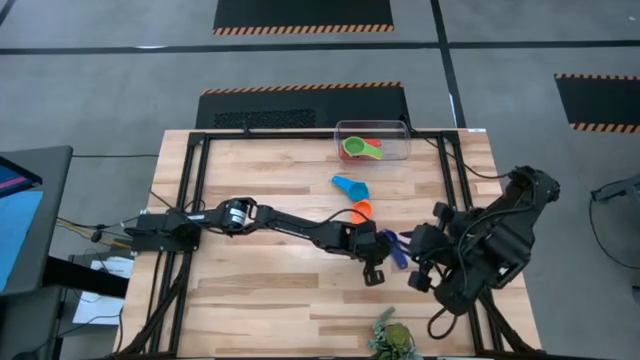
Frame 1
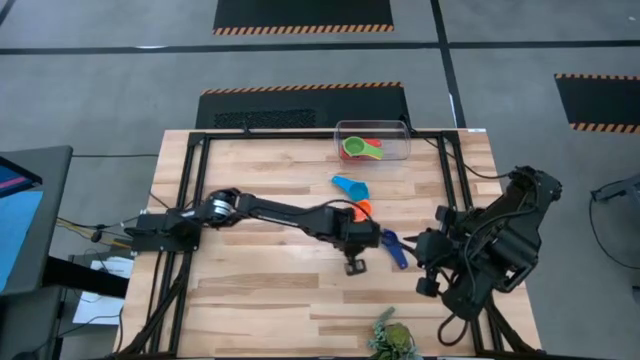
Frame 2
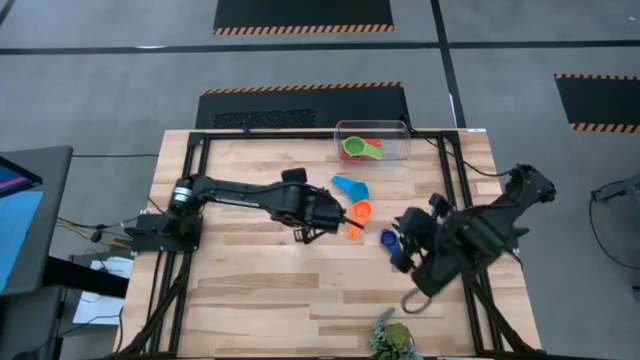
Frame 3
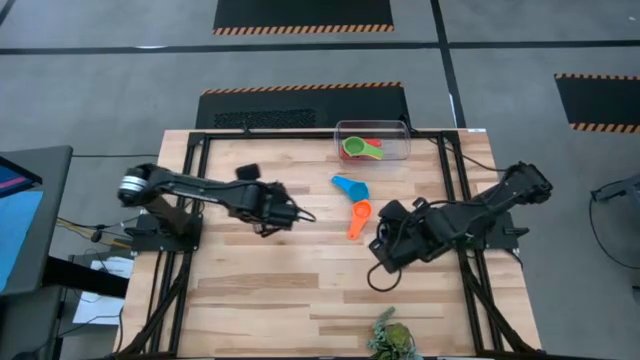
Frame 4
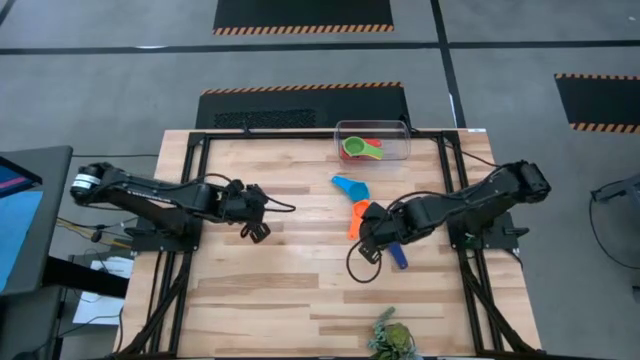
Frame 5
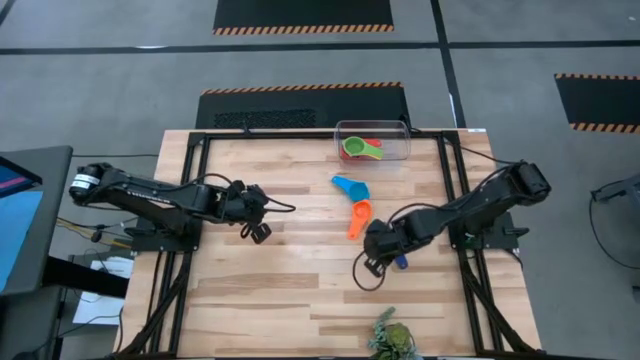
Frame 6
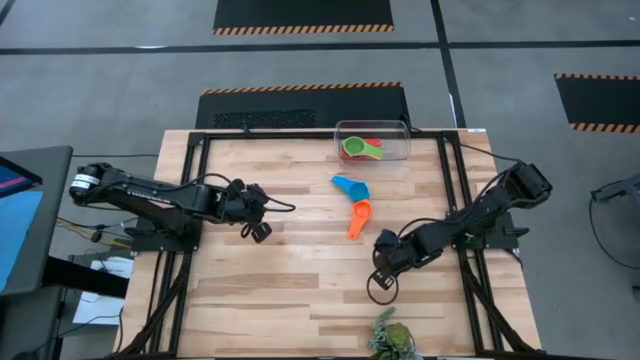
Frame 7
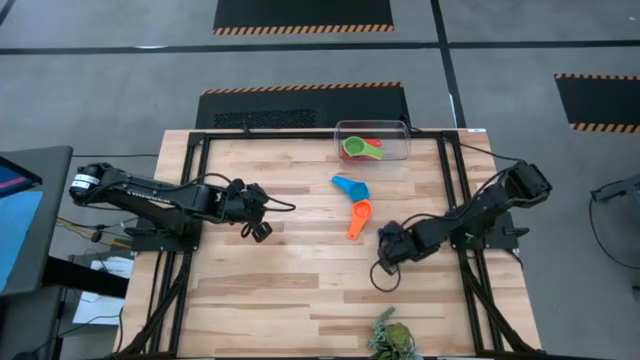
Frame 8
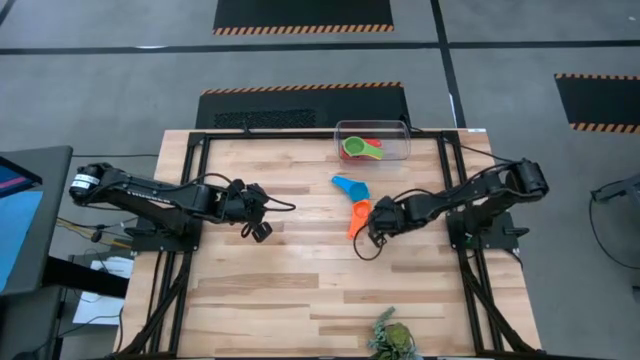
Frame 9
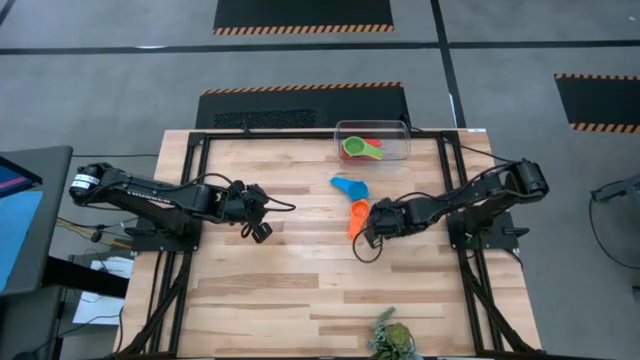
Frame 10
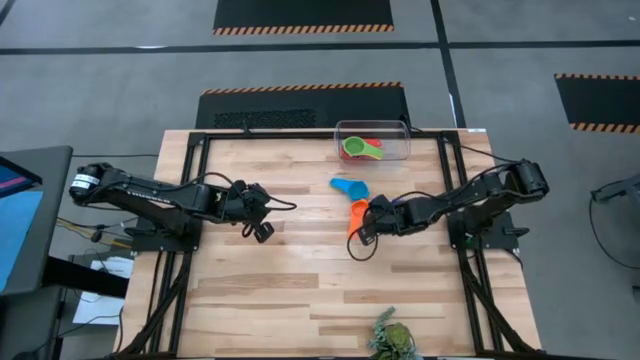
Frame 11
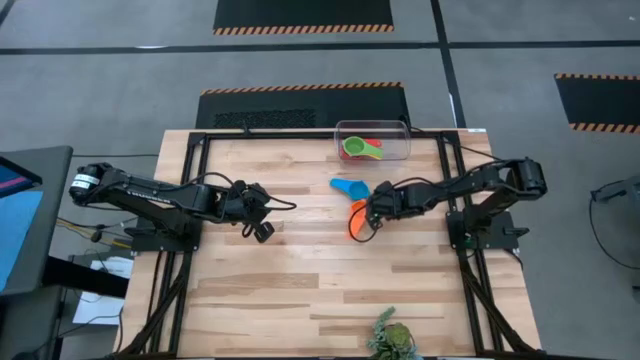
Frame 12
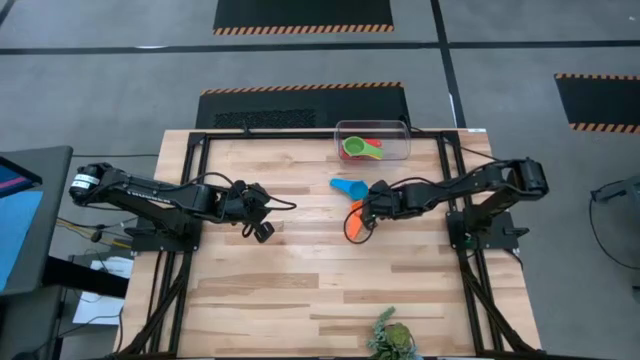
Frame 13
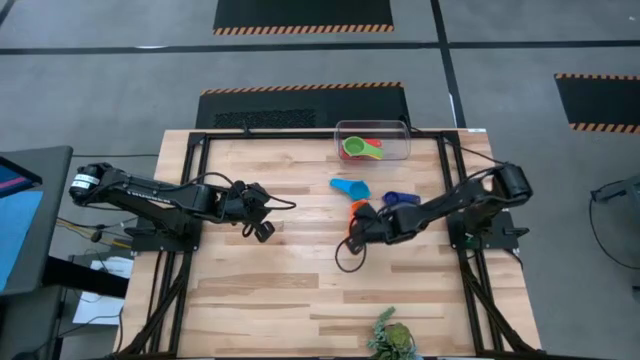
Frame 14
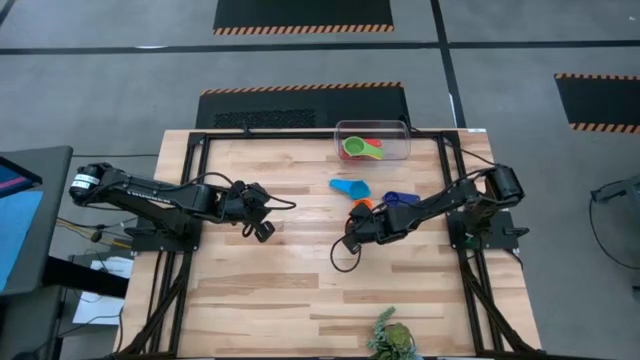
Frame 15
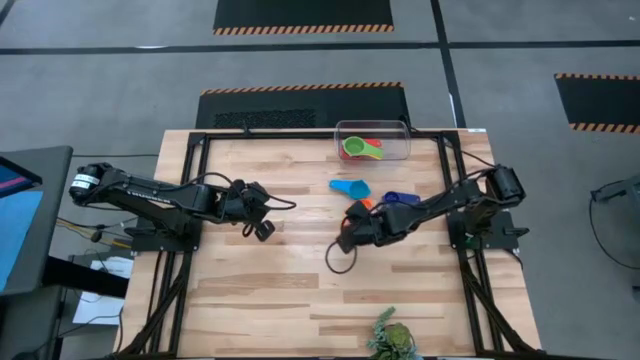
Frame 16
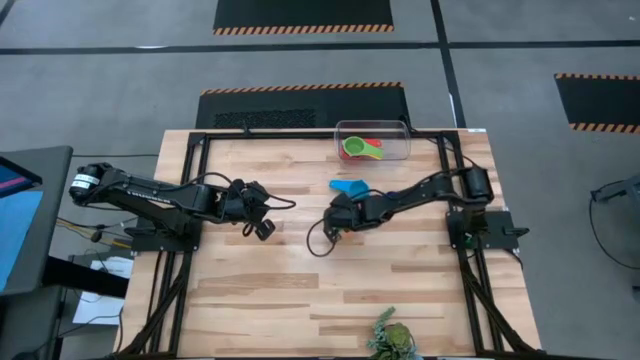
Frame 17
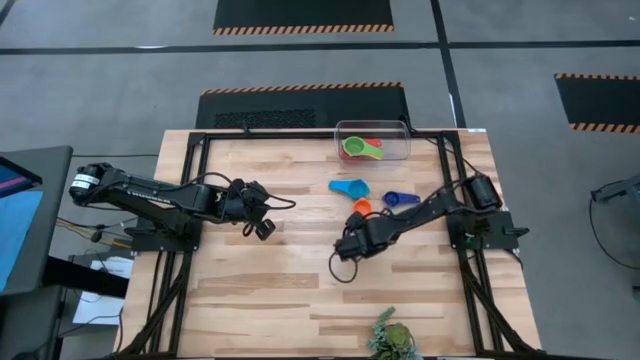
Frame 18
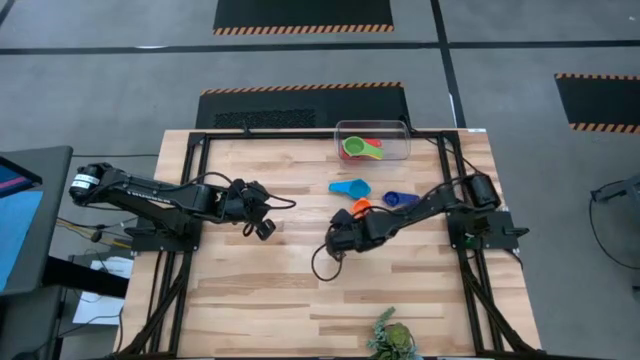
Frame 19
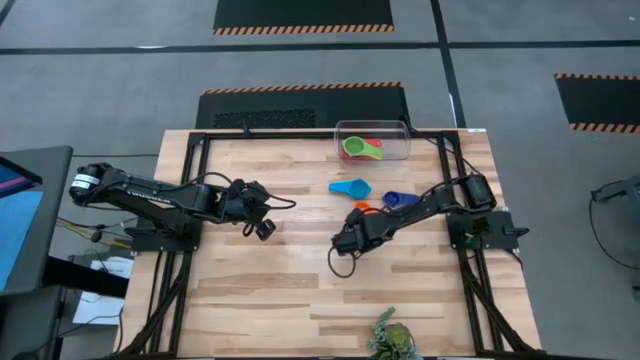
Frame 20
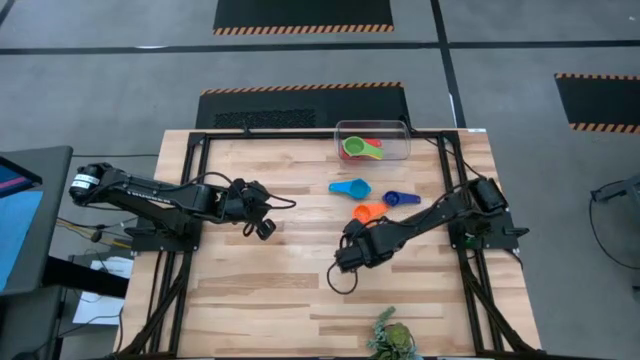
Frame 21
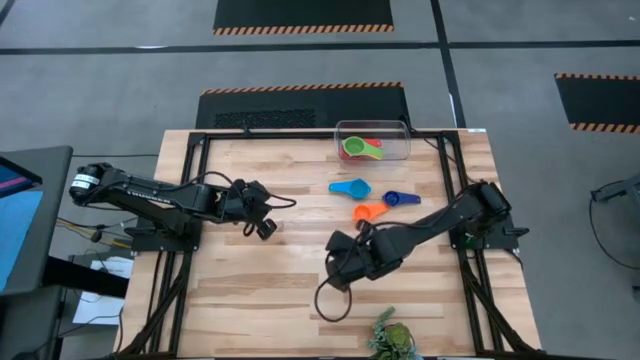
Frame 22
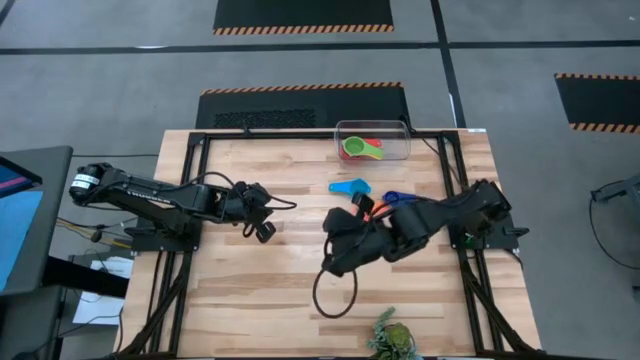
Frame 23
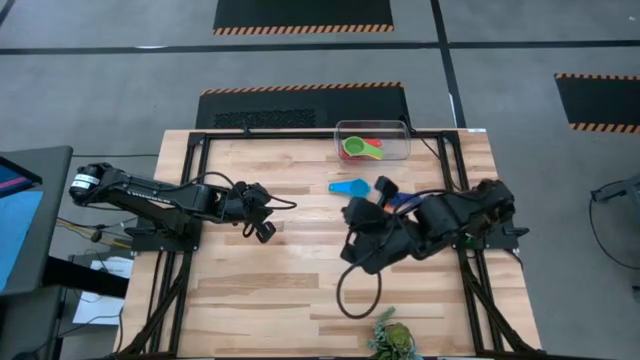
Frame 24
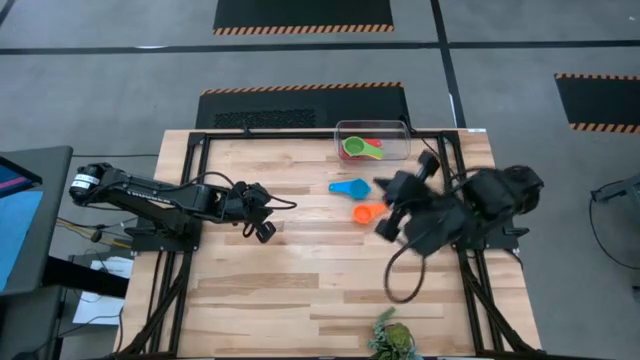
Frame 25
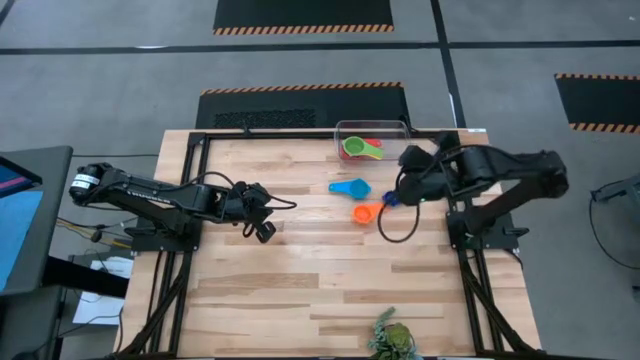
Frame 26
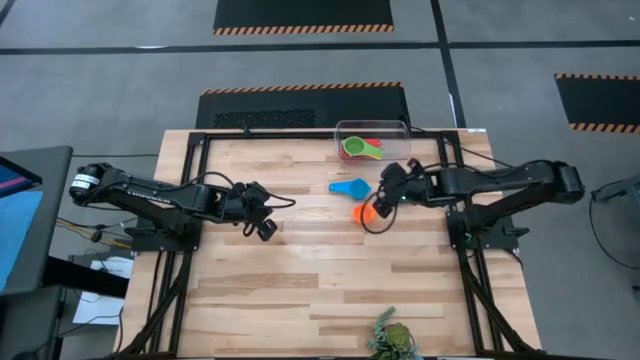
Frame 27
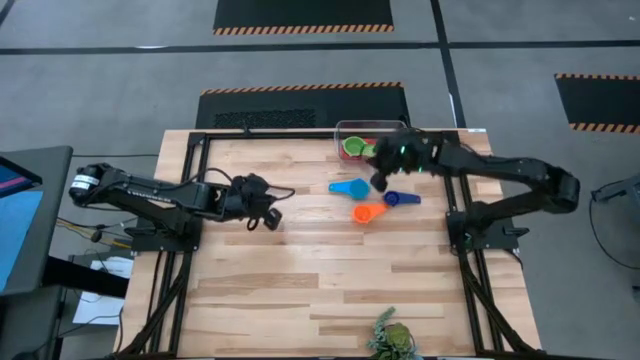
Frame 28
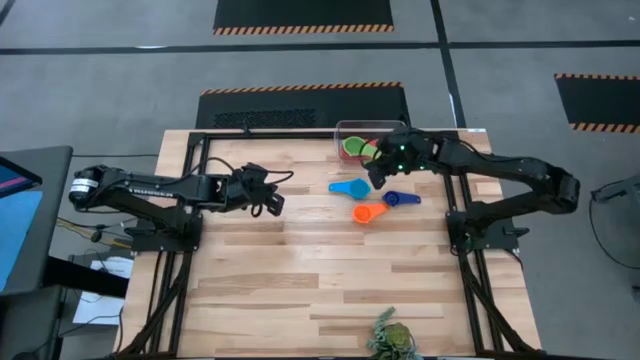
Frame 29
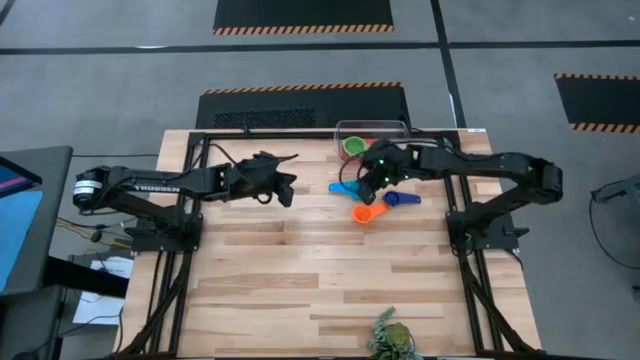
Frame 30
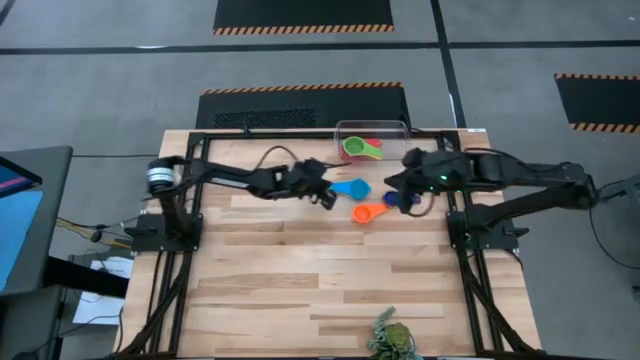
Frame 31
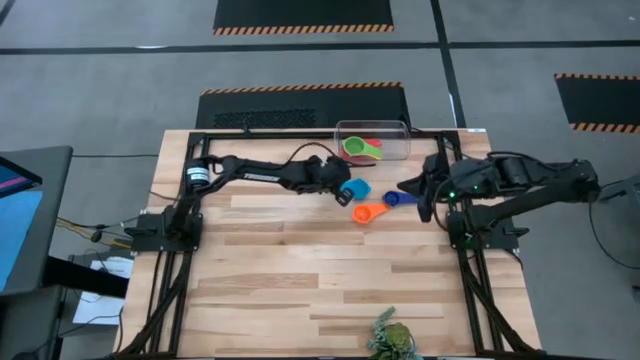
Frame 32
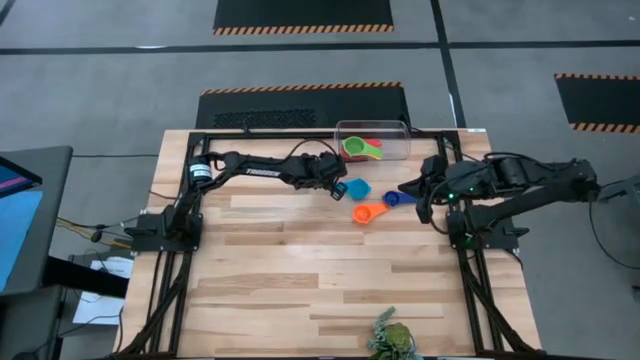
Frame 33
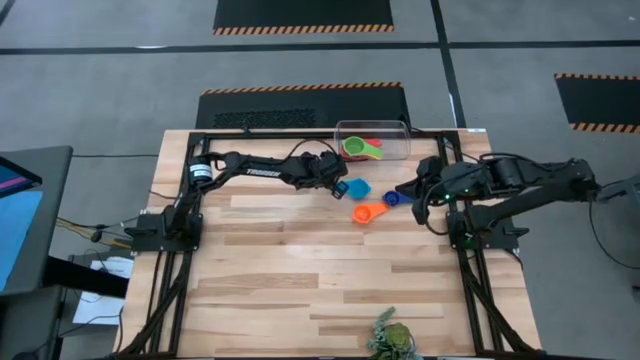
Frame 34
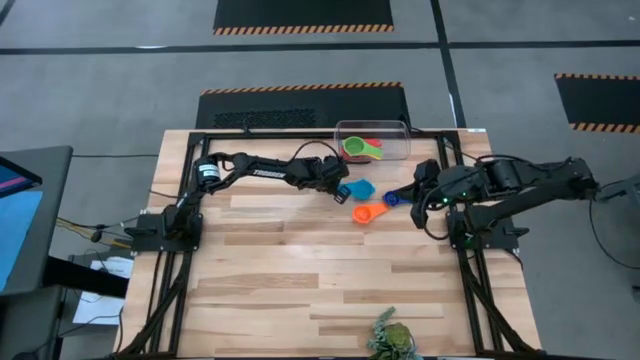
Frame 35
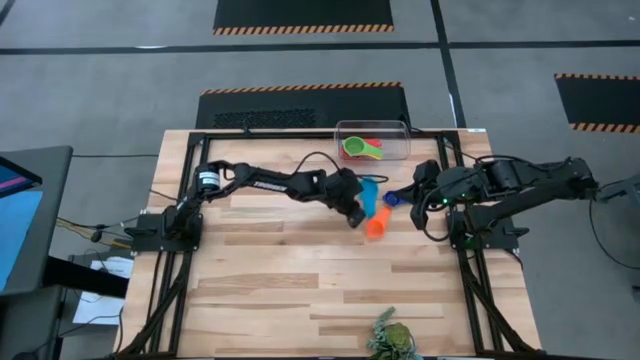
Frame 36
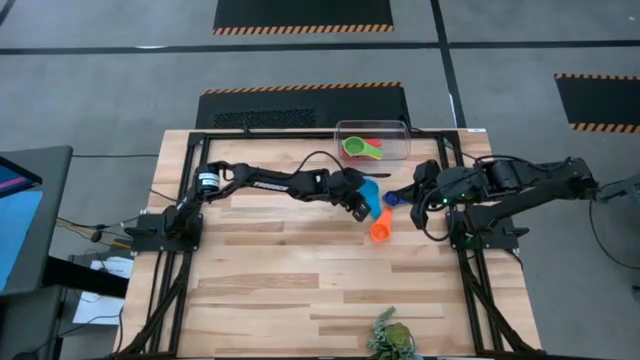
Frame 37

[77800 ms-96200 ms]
Task: Nest measuring cups in basket
Adjust the colored measuring cups to the top center of the table

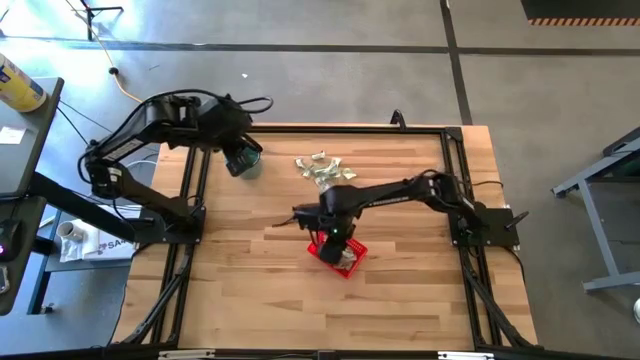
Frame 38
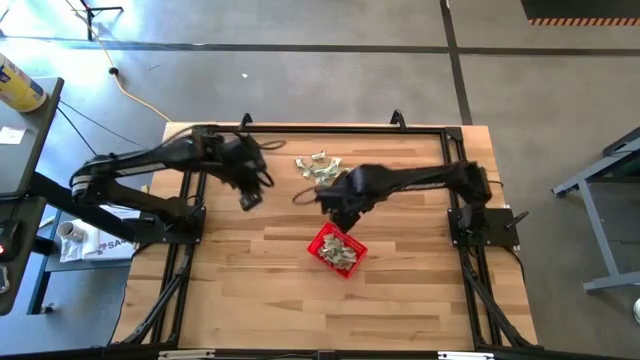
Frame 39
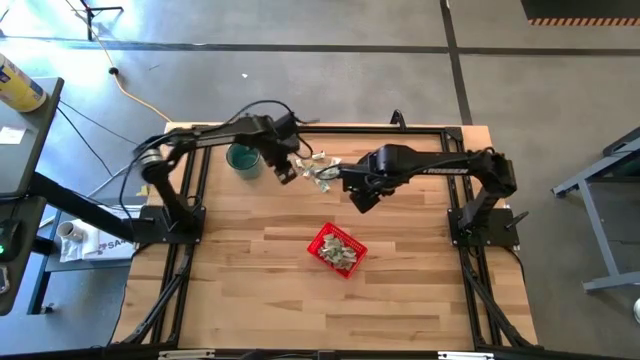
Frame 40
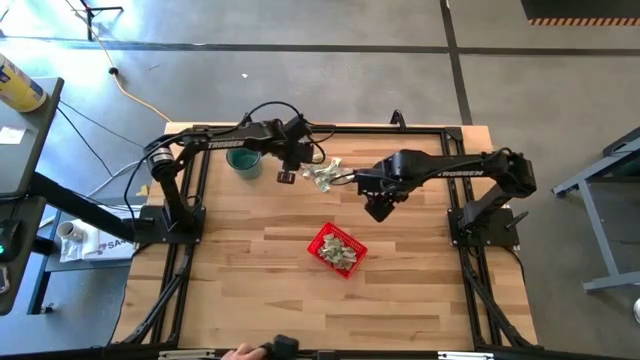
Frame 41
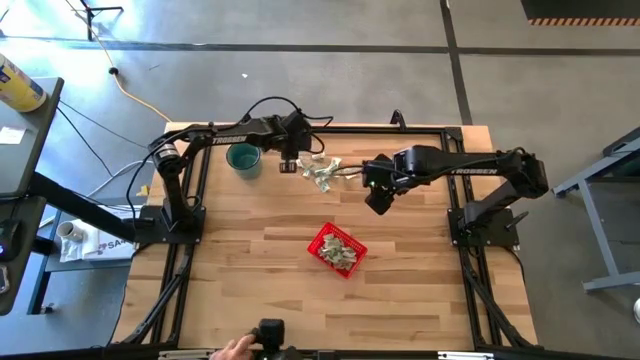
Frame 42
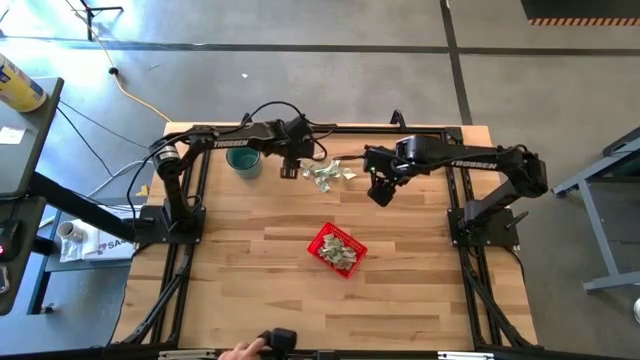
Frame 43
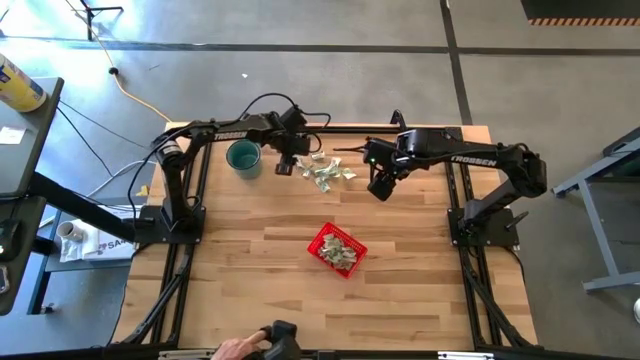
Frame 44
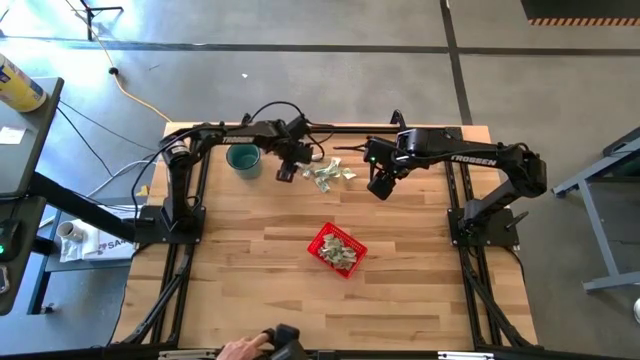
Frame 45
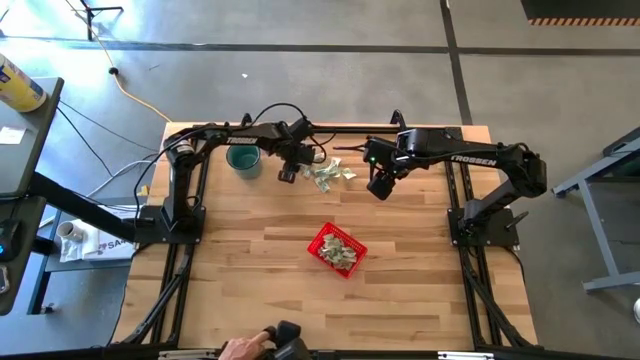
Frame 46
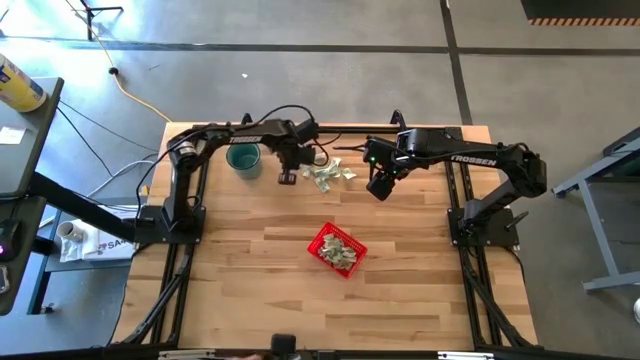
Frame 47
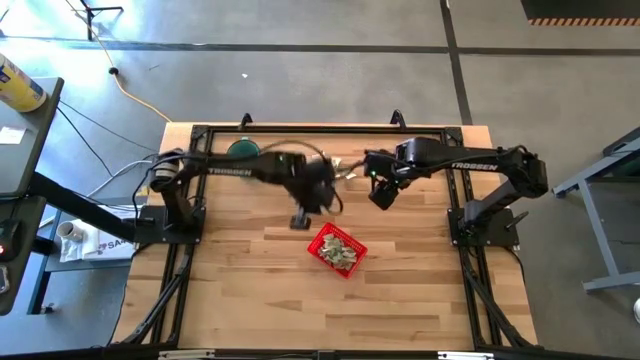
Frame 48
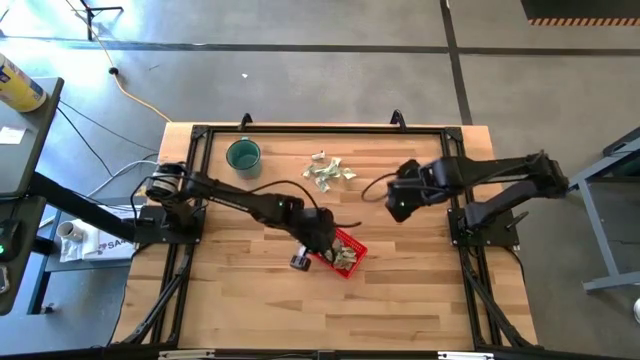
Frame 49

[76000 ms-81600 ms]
Task: Pick and place Stevia / Truvia into bins
Put the left green stevia packet into the bin
